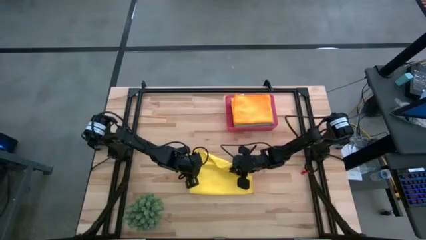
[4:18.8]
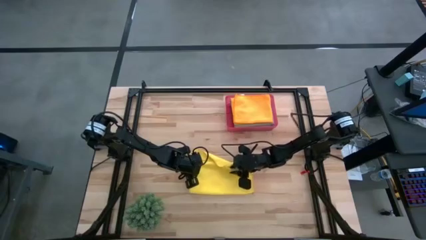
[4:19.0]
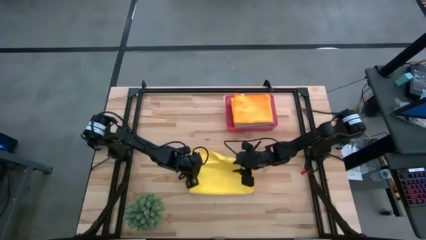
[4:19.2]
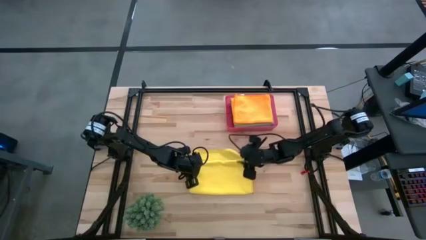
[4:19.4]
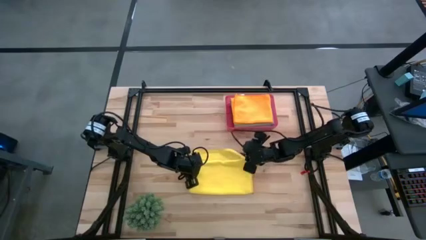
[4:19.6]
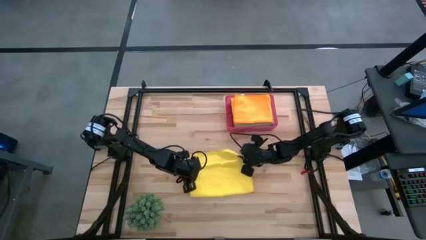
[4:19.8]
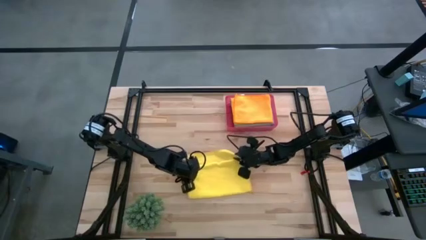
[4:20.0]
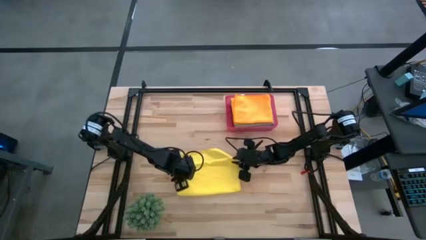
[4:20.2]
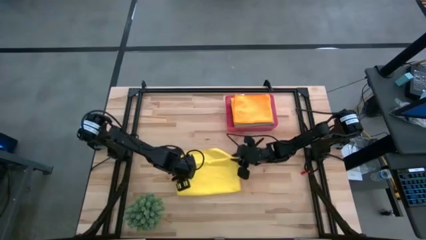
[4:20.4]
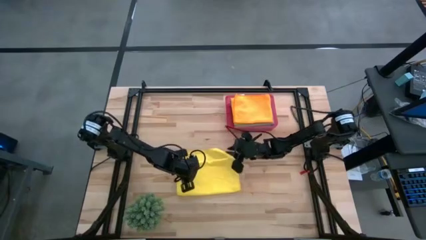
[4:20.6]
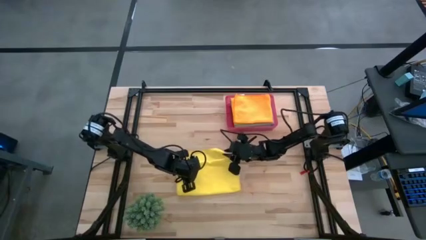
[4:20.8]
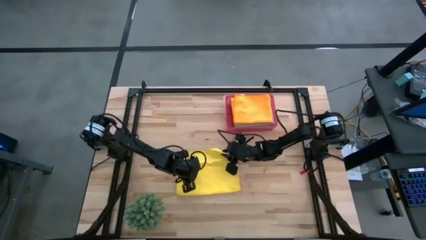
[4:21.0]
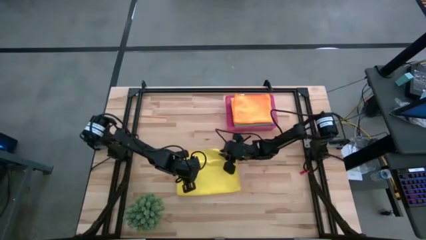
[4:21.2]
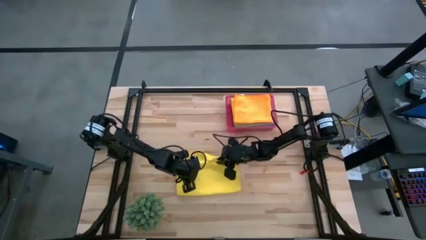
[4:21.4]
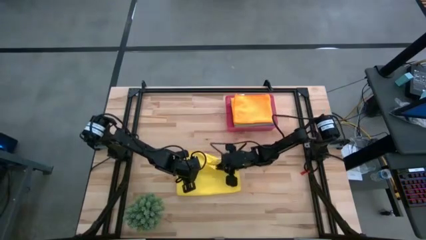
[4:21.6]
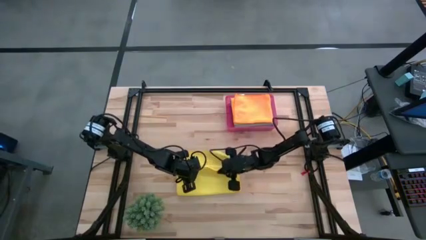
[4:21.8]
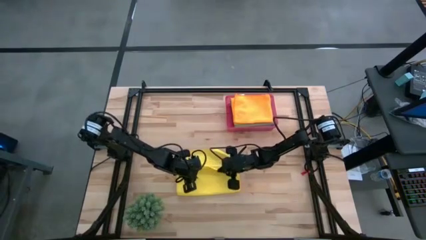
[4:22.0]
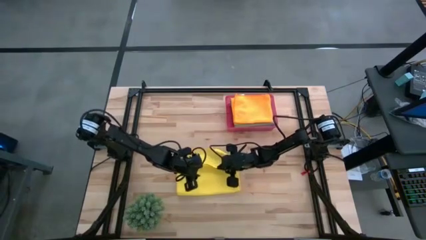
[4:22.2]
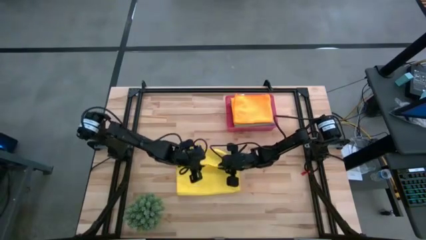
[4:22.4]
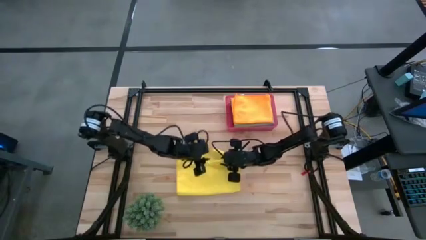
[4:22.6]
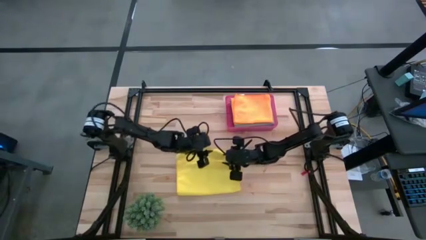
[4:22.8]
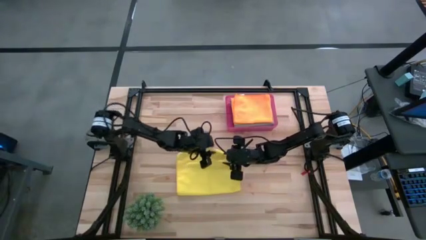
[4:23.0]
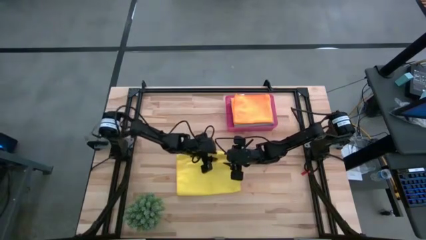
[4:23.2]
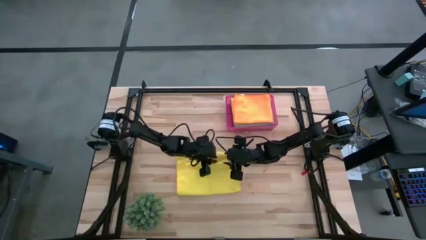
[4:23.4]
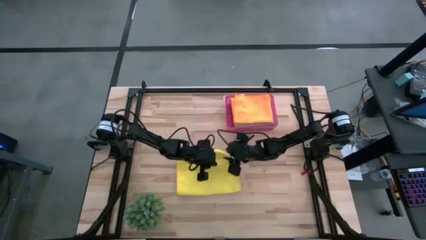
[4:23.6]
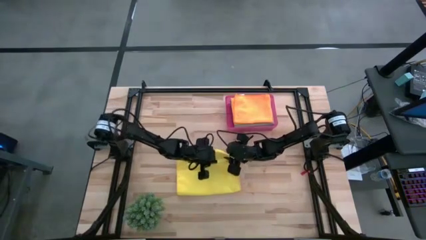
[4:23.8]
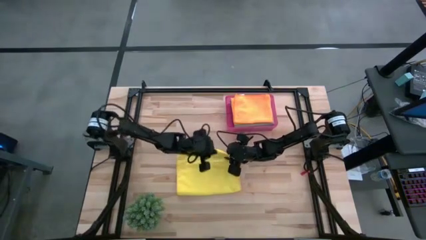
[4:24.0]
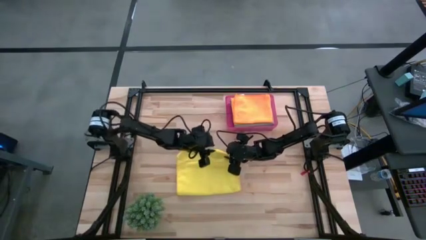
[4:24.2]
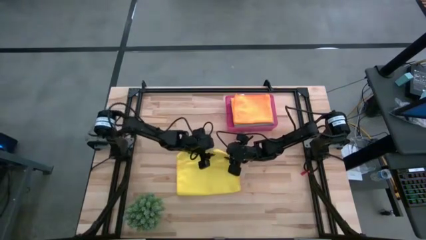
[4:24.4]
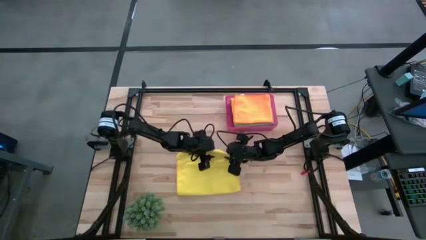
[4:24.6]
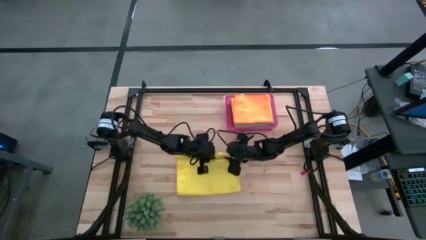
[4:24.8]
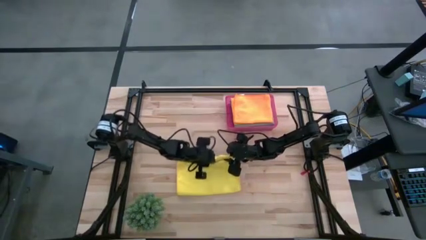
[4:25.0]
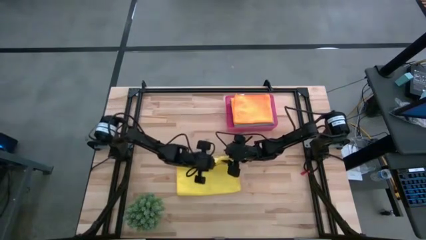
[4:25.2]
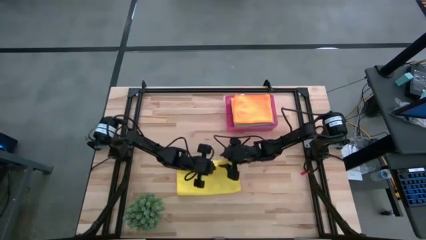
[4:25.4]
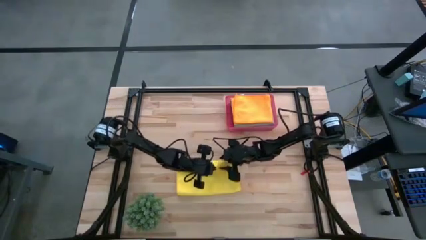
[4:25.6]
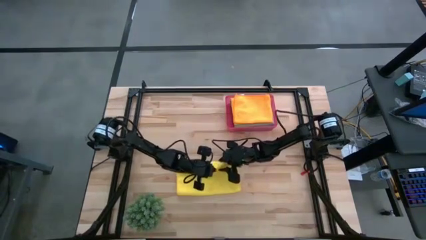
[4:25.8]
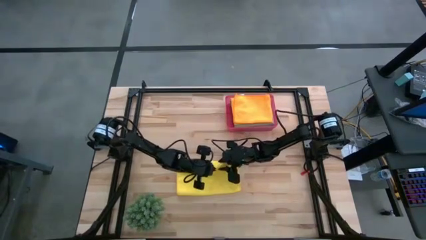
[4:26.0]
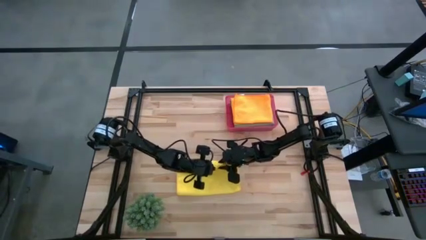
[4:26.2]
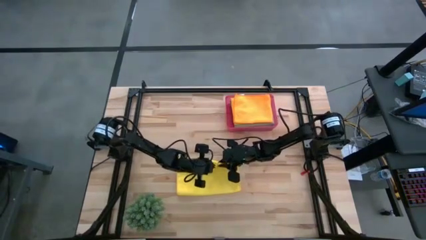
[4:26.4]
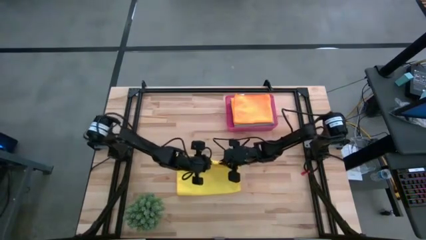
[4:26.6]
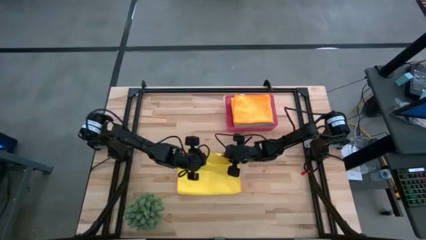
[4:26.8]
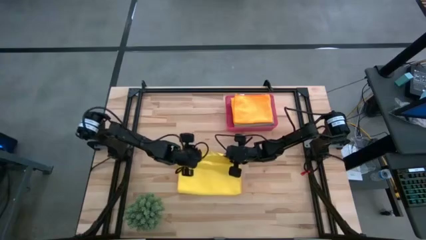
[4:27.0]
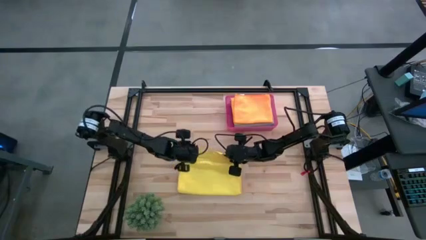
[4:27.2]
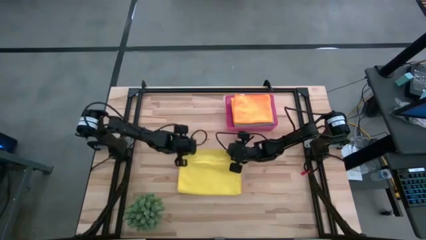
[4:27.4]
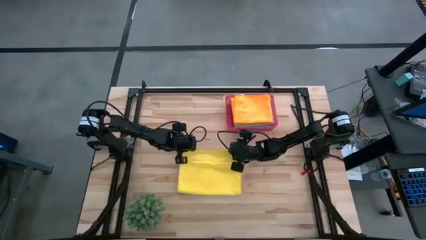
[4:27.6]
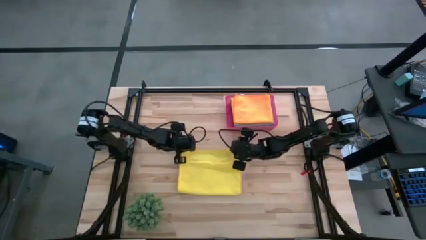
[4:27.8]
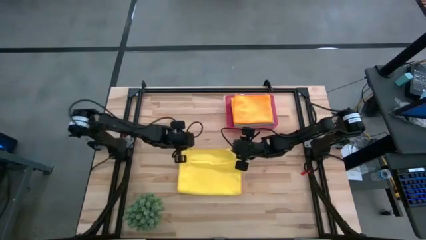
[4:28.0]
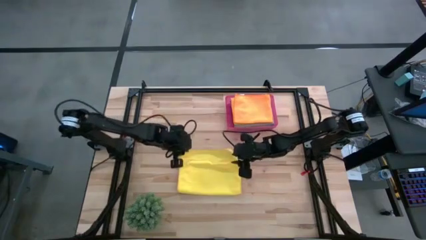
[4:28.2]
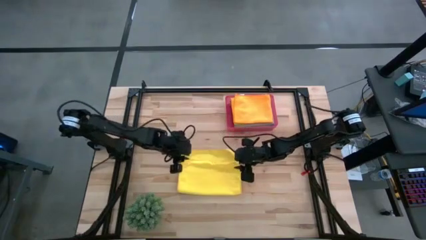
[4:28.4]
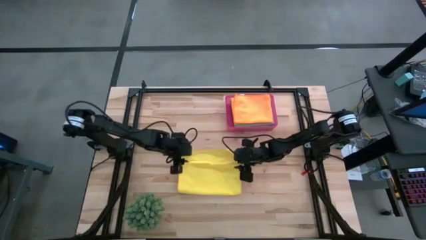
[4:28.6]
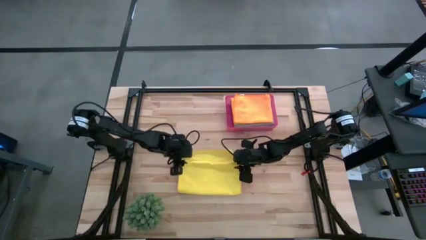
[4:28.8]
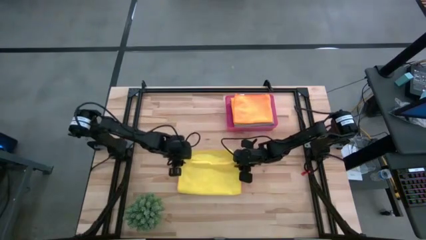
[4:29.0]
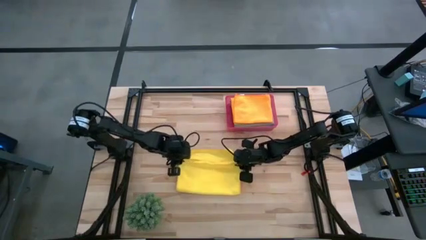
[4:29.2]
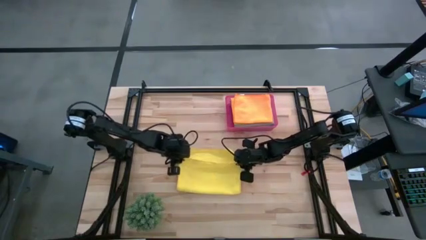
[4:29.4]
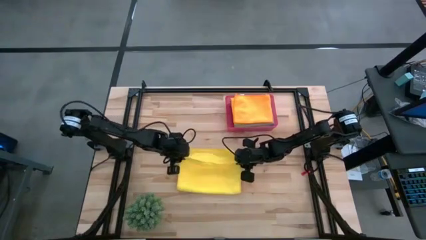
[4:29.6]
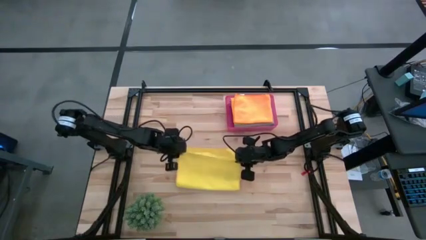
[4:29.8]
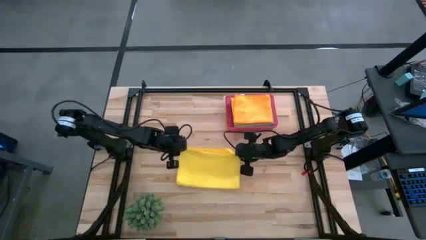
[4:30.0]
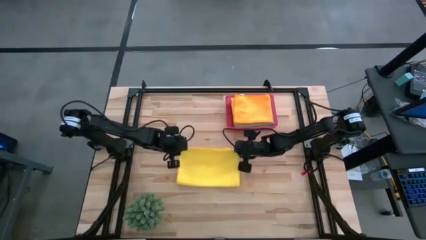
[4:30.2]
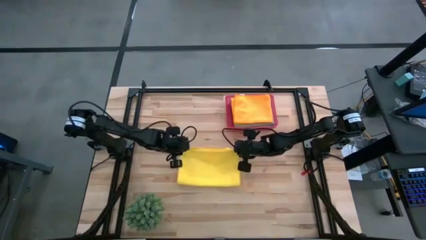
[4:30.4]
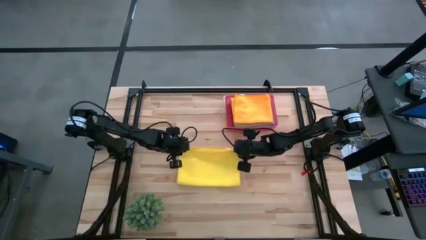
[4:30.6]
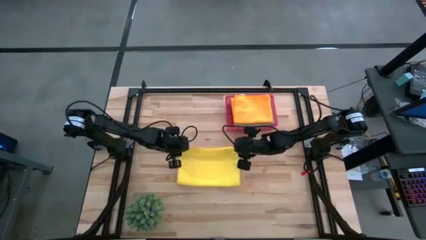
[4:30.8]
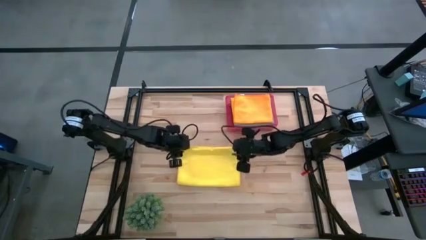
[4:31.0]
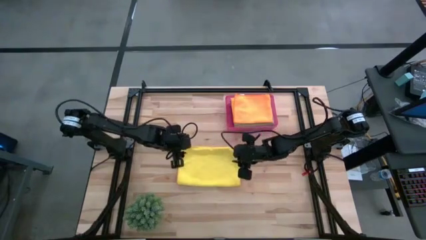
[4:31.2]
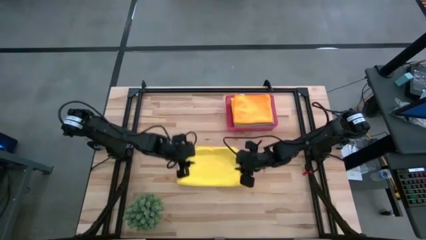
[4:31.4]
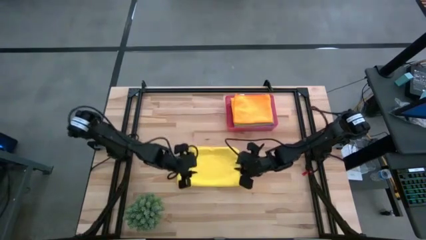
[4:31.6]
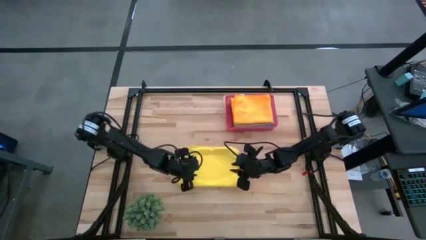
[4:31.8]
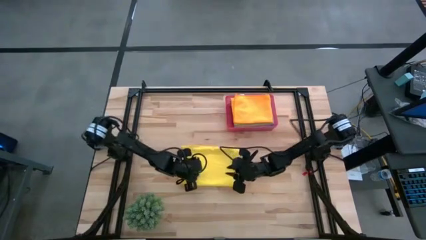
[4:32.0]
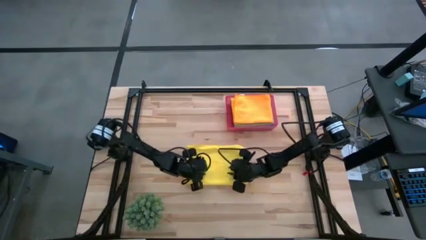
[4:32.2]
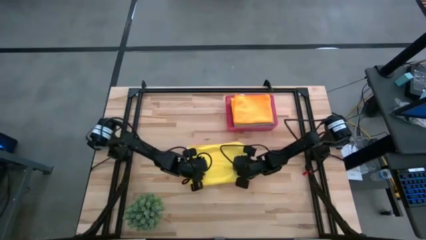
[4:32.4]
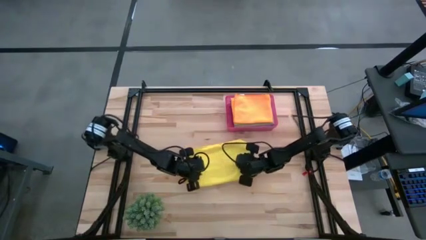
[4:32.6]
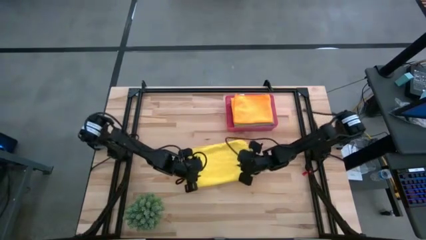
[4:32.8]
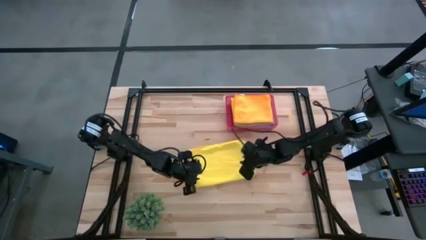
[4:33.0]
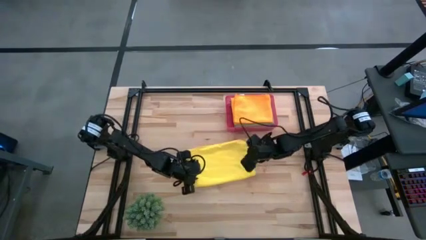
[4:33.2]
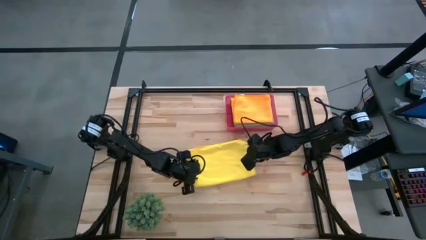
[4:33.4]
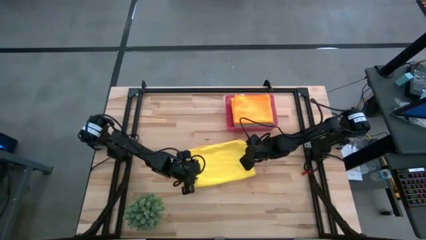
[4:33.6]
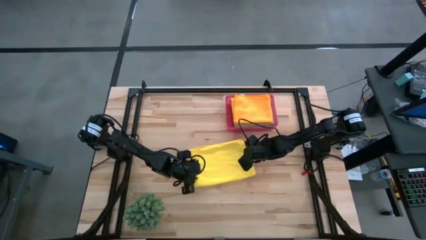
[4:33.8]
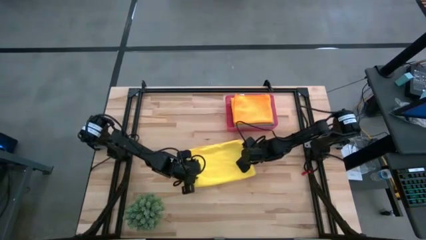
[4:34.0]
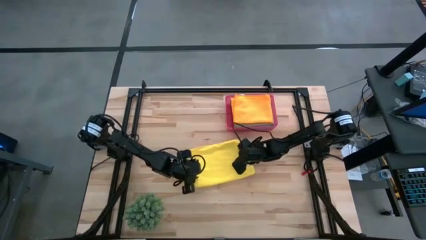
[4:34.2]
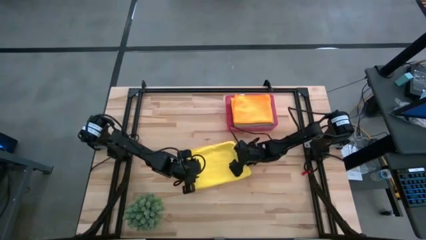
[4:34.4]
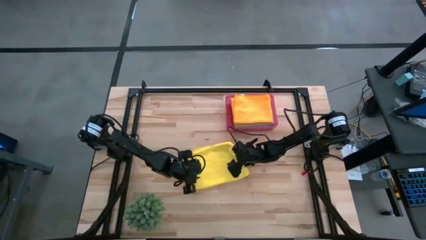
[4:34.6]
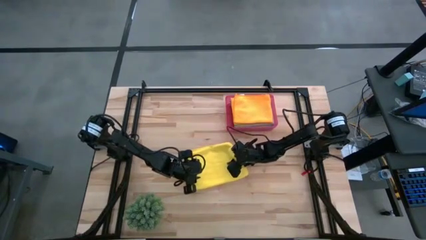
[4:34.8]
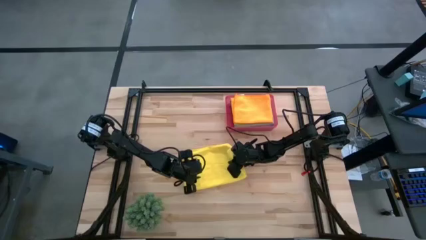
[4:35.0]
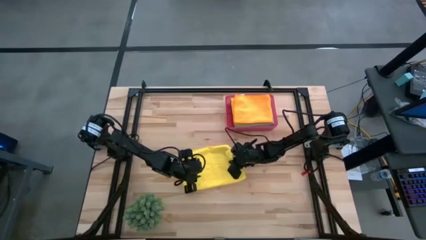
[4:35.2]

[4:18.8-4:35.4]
Task: Fold microfiber towels
Fold the yellow microfiber cloth
